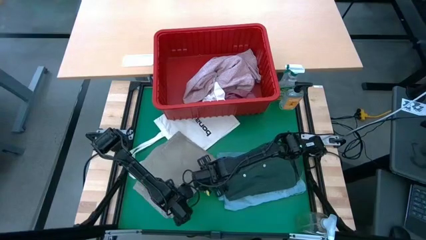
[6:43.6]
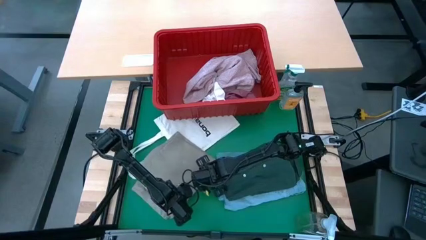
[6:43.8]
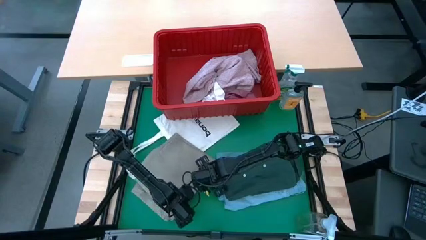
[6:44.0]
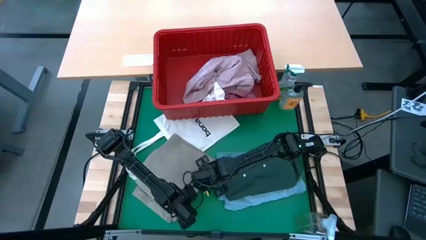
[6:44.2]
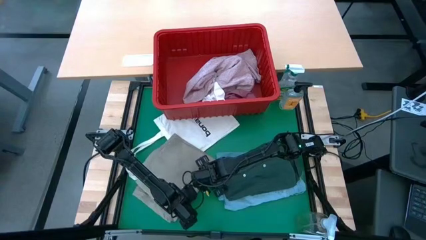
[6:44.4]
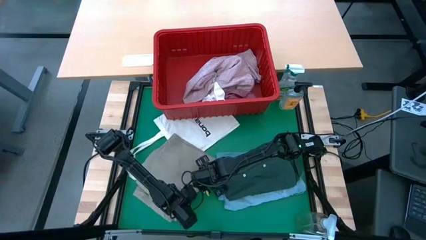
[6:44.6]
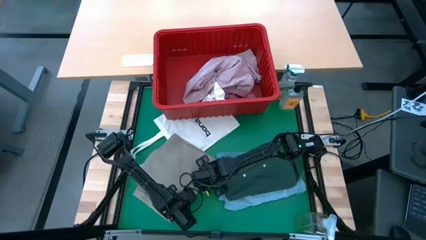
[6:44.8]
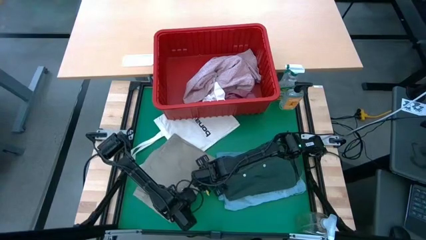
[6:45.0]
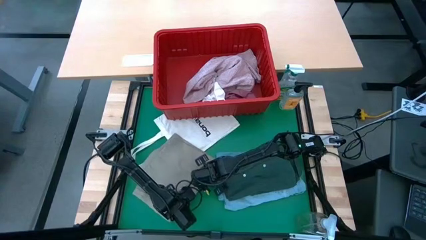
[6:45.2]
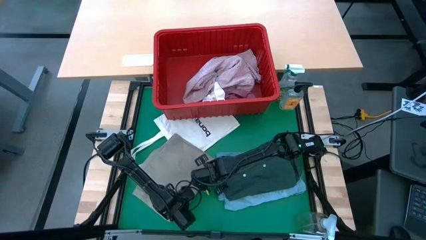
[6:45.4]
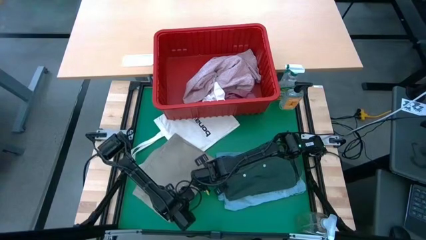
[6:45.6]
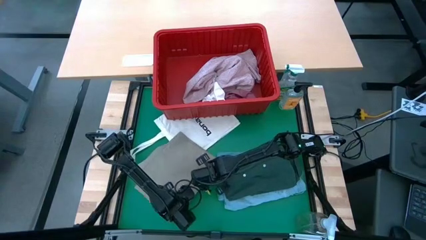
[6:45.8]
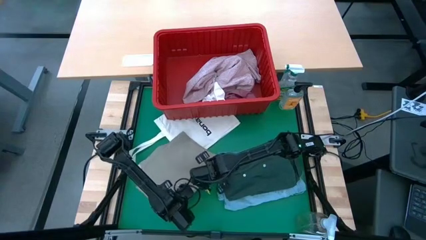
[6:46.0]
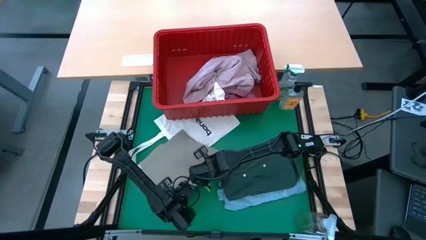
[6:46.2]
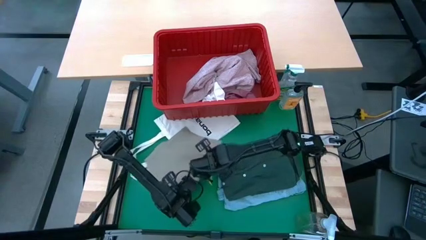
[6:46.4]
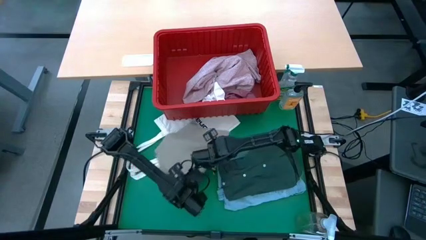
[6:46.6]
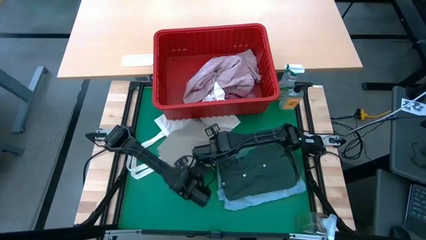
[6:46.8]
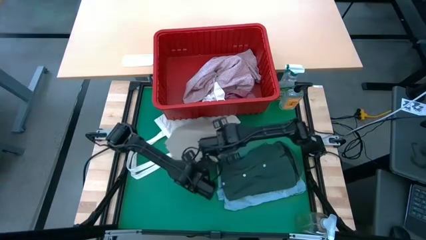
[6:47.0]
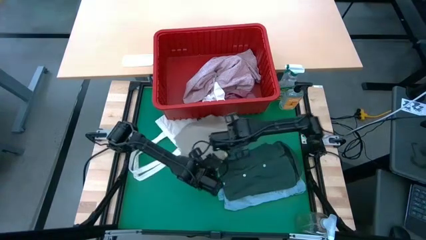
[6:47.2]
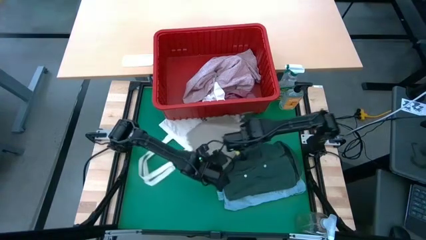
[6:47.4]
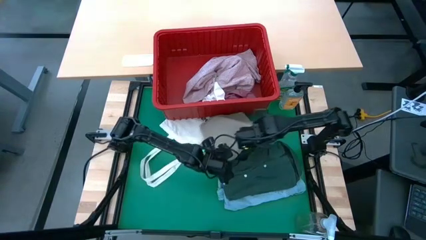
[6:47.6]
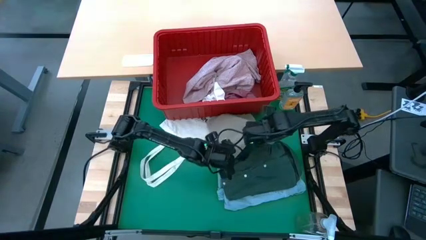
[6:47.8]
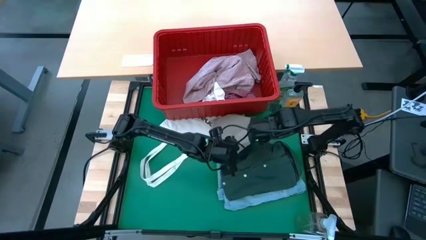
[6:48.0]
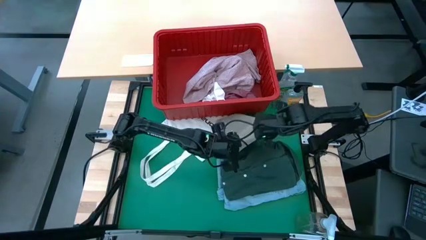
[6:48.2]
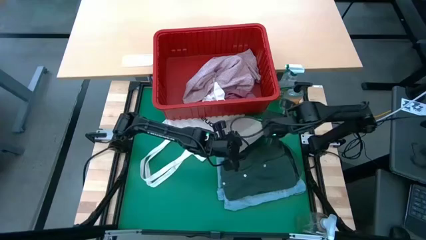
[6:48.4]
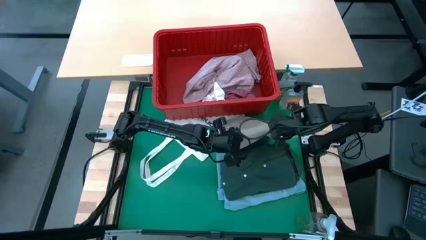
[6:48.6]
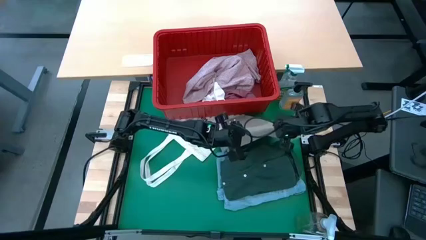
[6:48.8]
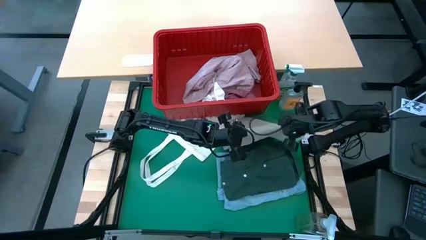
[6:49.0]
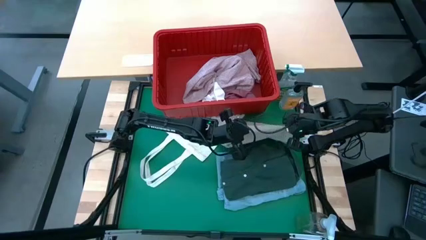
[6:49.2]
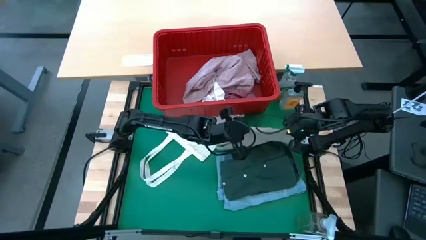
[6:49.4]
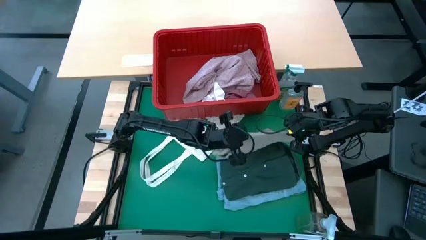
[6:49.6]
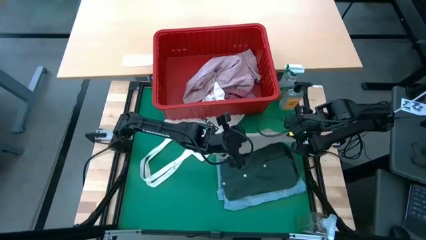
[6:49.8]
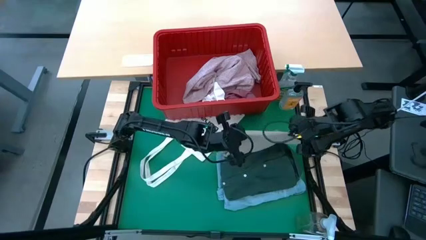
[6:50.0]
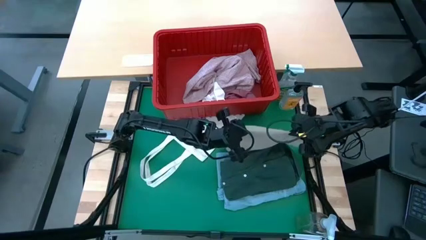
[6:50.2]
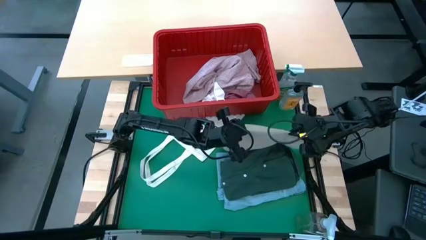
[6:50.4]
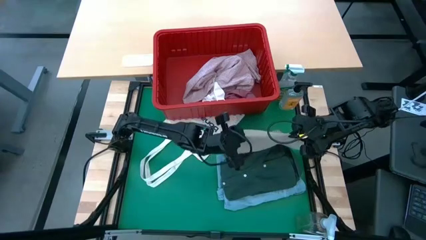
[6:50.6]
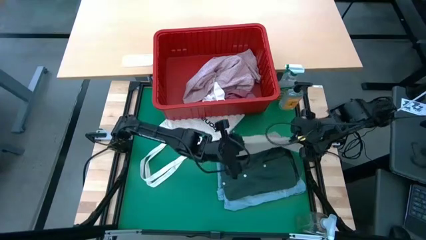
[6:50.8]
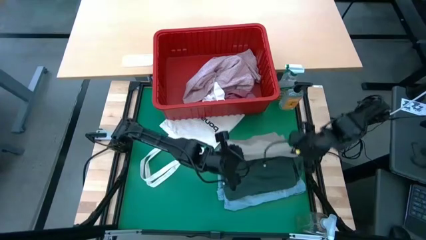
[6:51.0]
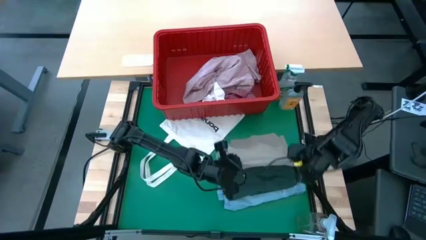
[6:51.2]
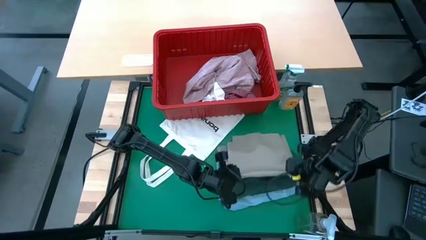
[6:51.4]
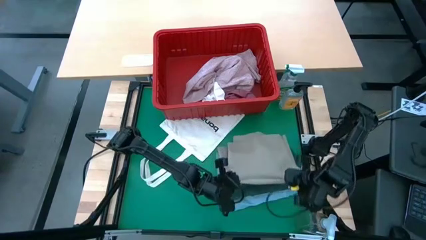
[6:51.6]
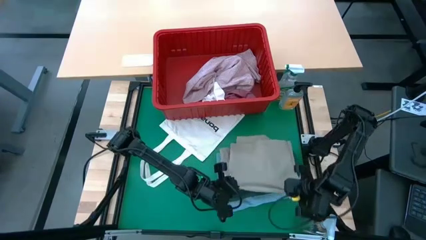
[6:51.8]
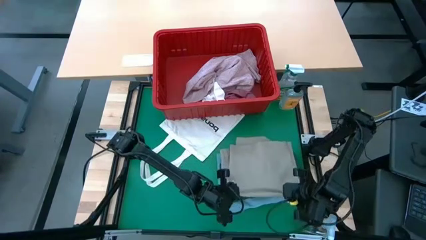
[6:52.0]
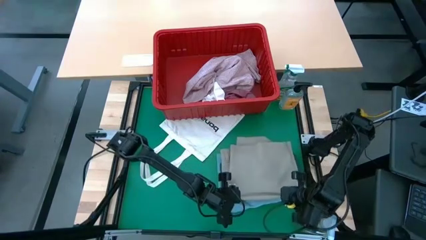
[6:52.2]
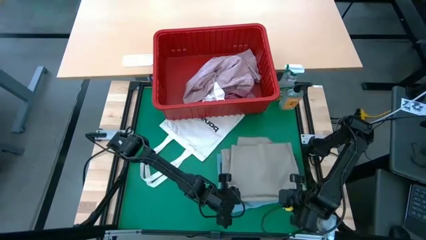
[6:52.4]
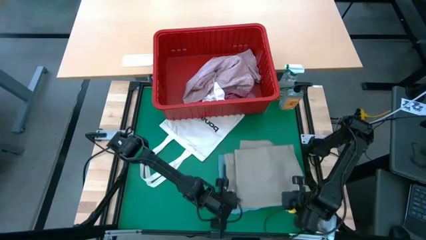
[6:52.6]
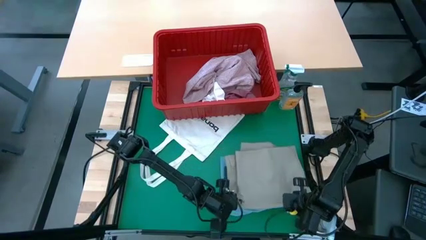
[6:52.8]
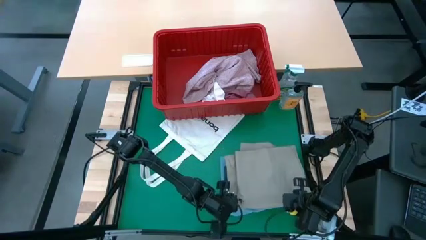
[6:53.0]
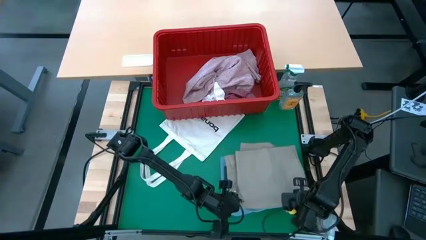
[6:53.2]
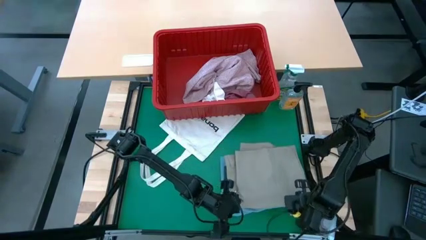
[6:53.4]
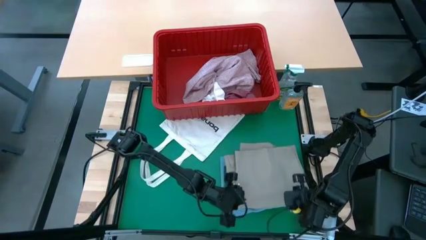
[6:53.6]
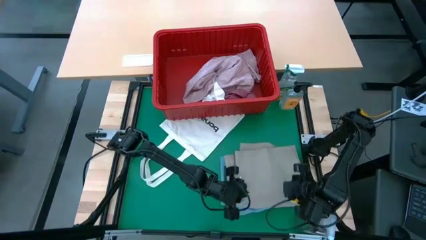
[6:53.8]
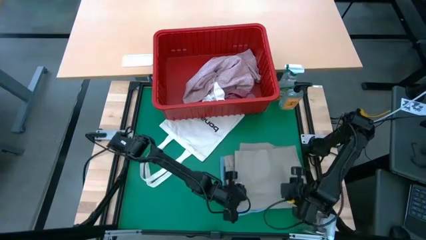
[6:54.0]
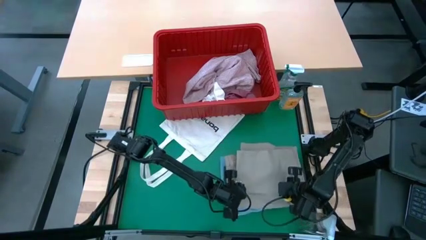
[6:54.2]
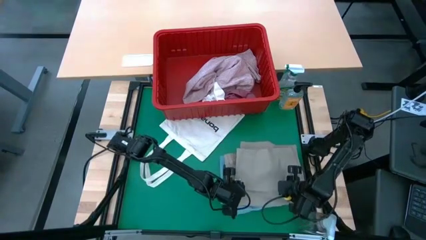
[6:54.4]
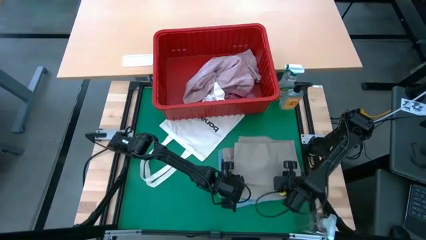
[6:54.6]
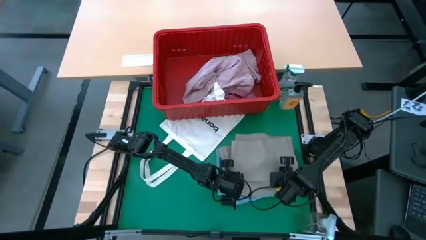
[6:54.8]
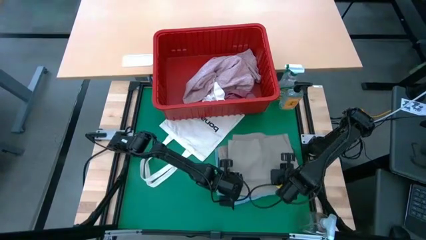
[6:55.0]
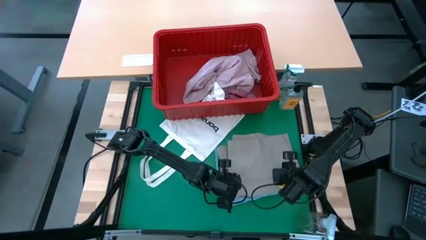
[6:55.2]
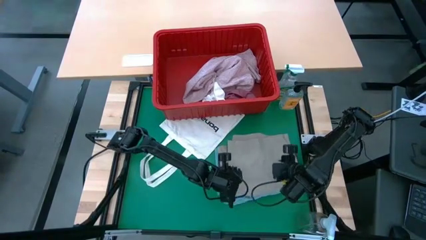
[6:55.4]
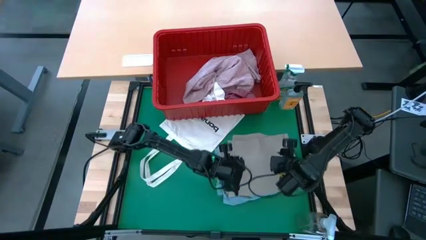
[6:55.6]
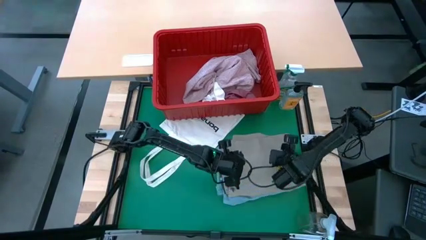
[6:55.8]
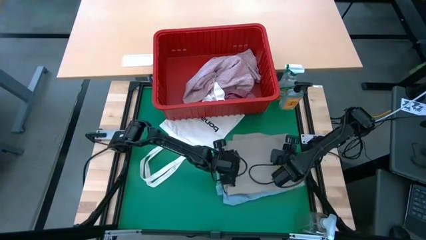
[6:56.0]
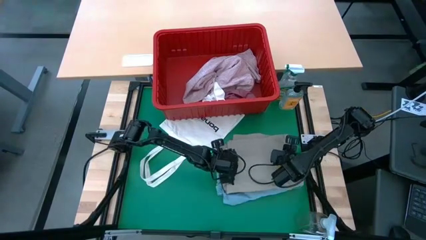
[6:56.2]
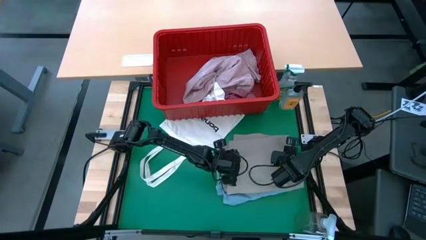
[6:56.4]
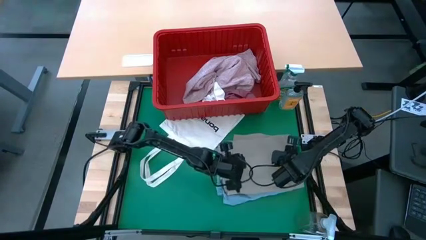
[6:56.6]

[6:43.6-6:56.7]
Task: Fold laundry
Stack the gray shorts on top of the green shirt

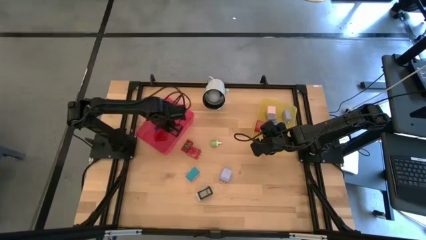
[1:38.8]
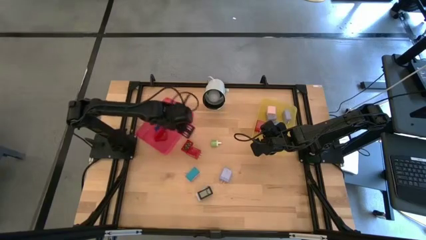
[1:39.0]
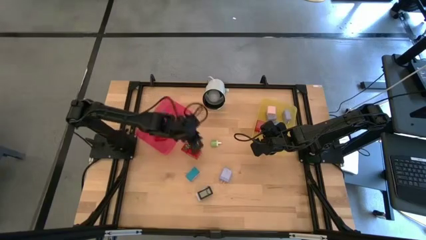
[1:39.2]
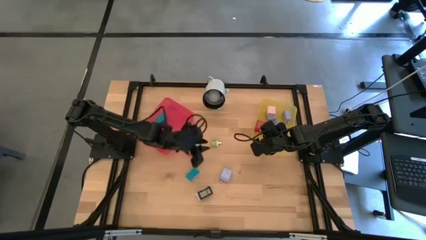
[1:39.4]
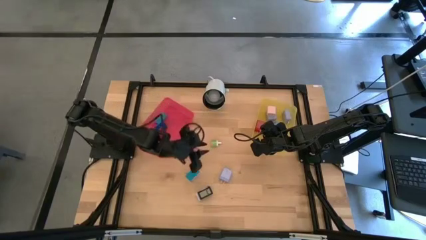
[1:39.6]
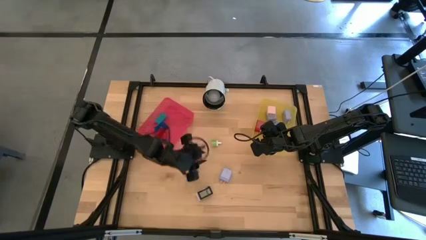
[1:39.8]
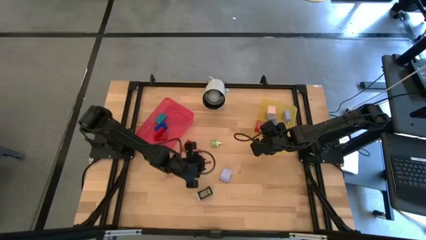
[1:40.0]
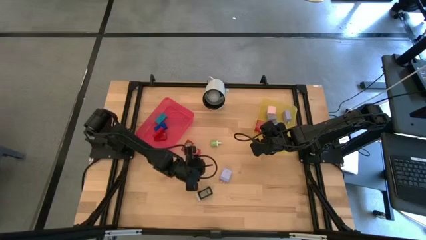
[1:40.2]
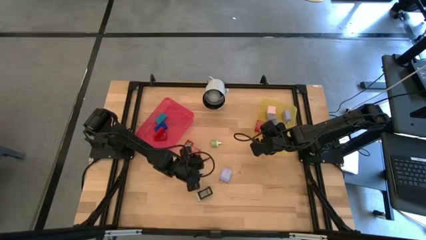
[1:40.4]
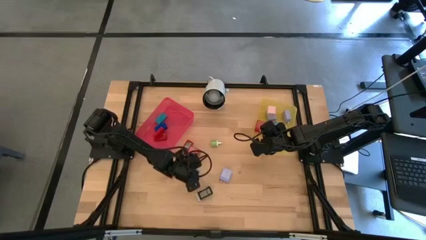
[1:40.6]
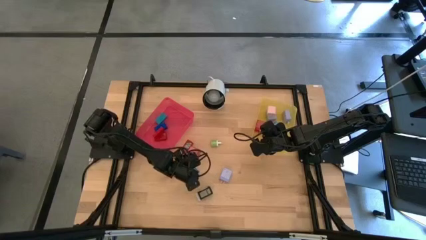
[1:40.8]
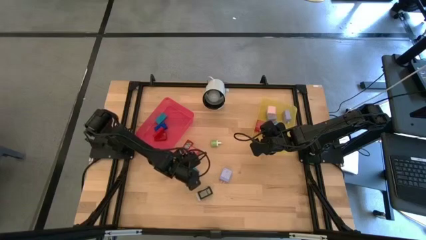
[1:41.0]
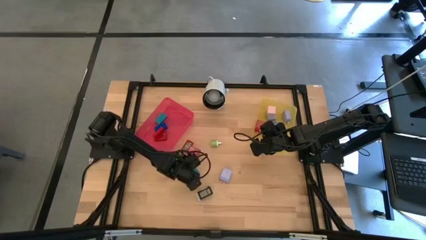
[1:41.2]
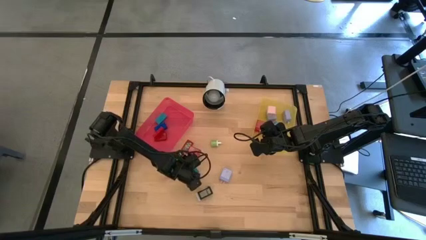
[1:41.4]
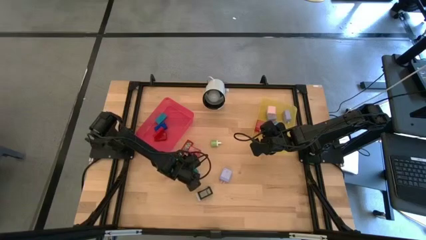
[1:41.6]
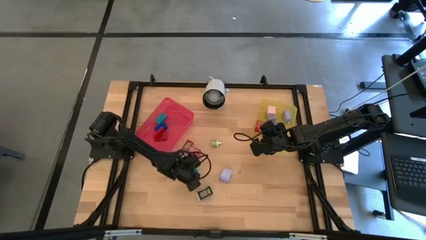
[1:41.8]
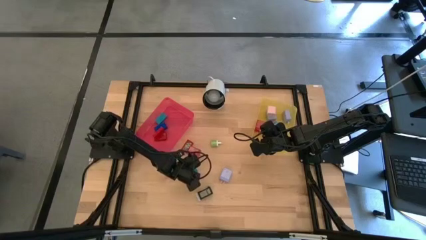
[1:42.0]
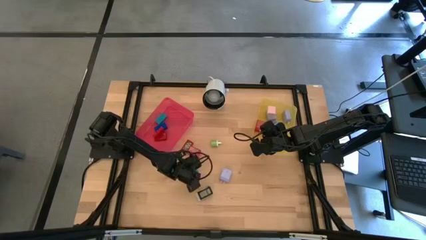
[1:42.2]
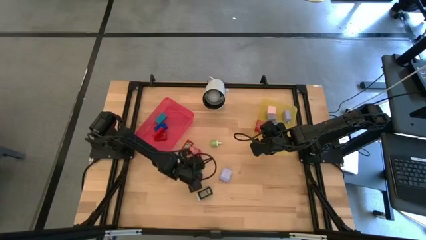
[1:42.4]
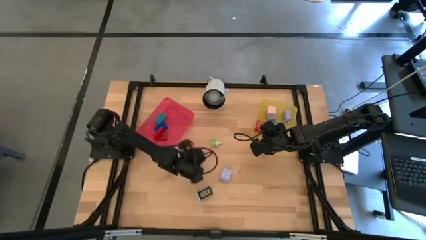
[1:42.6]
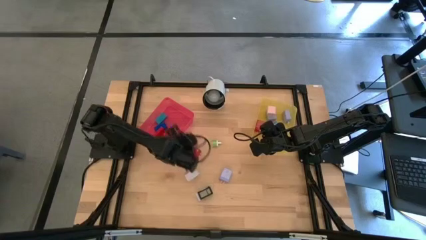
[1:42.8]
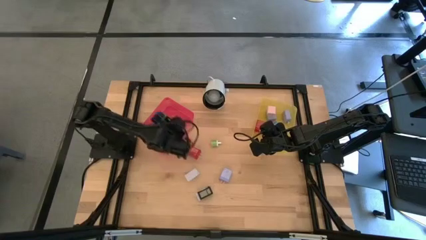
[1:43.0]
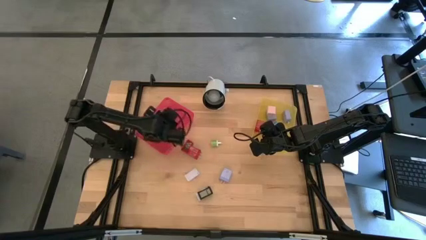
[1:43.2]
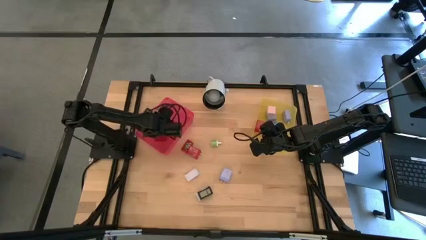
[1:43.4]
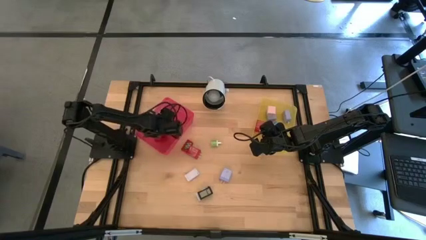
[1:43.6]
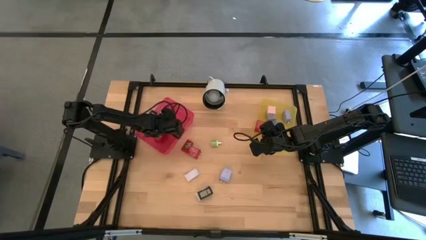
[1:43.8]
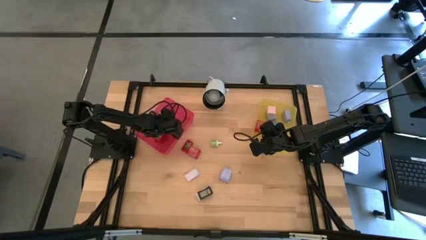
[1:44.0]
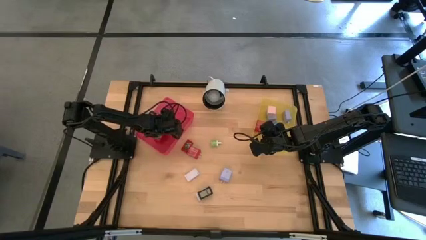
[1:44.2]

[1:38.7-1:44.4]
Task: Pick & Place Office items
Put the light blue digital timer into the pink bin
